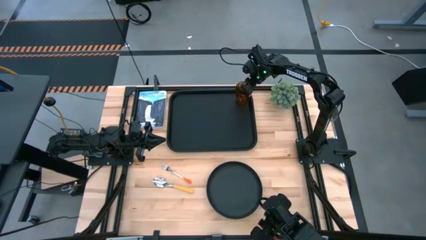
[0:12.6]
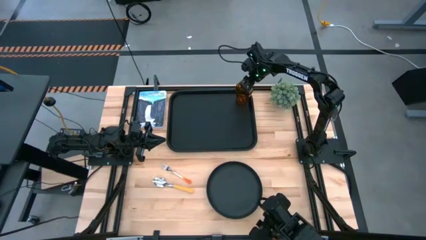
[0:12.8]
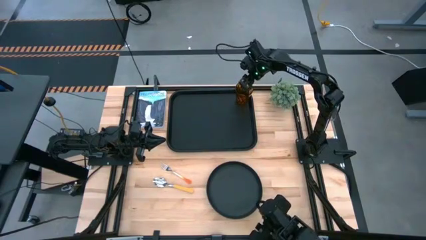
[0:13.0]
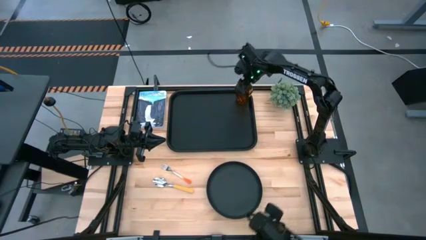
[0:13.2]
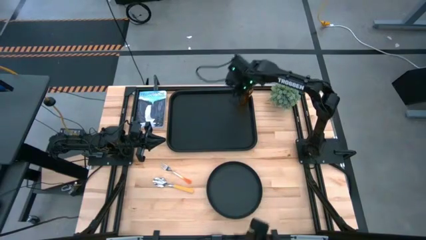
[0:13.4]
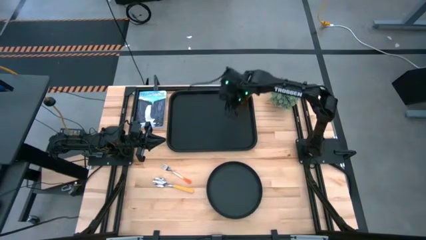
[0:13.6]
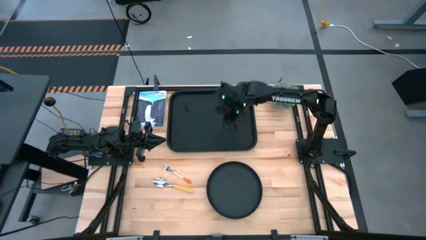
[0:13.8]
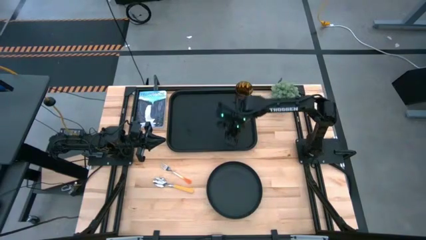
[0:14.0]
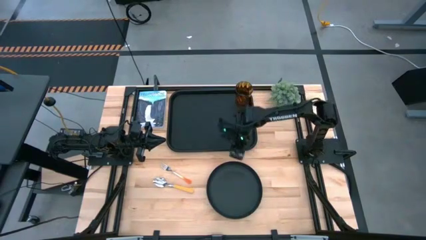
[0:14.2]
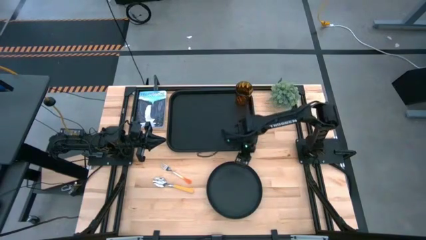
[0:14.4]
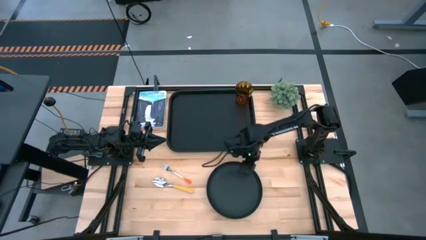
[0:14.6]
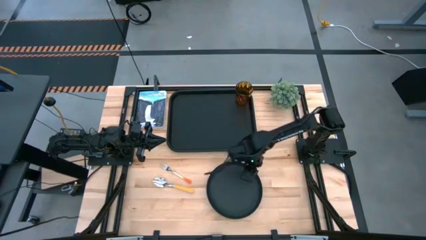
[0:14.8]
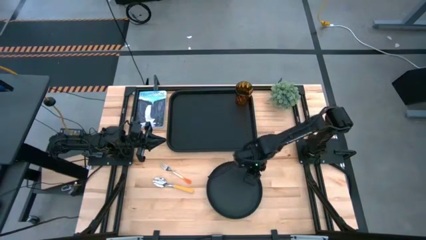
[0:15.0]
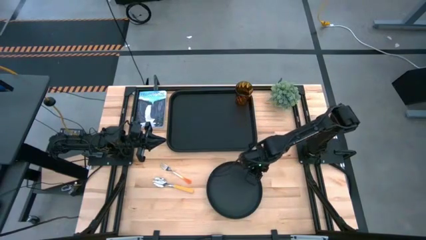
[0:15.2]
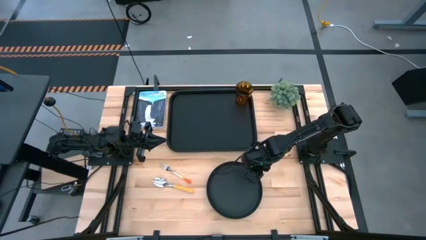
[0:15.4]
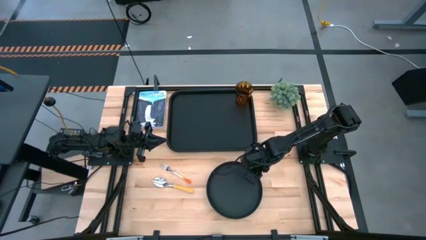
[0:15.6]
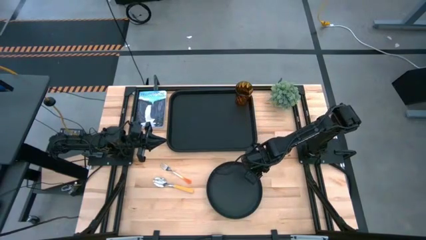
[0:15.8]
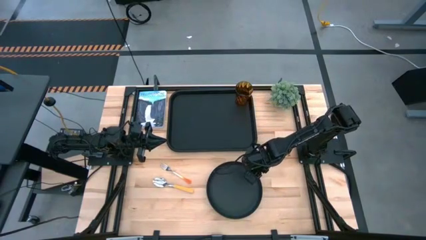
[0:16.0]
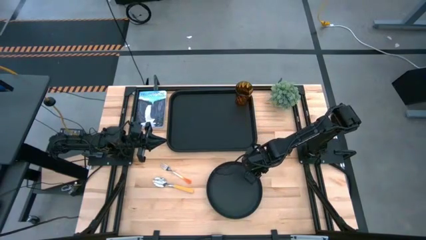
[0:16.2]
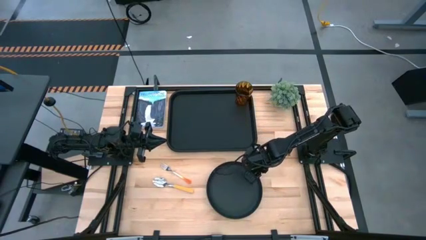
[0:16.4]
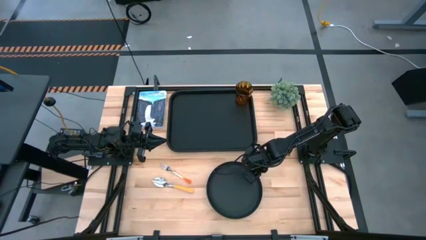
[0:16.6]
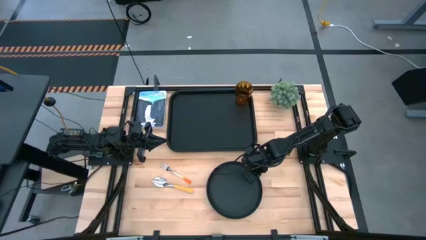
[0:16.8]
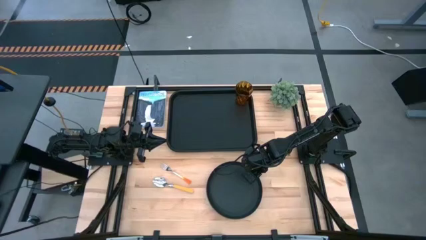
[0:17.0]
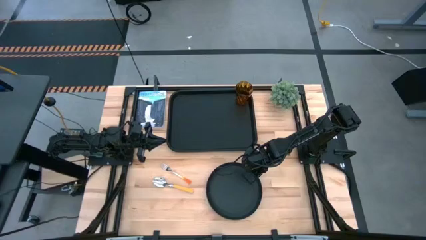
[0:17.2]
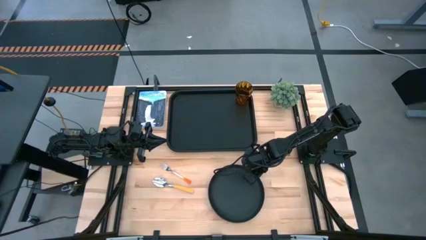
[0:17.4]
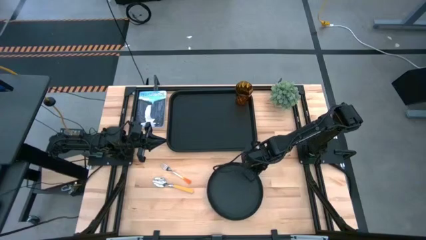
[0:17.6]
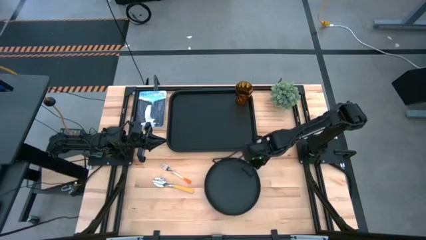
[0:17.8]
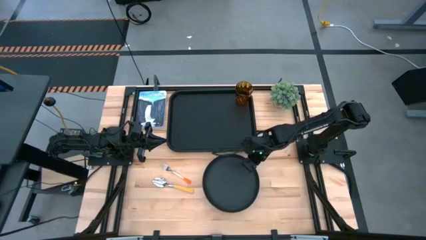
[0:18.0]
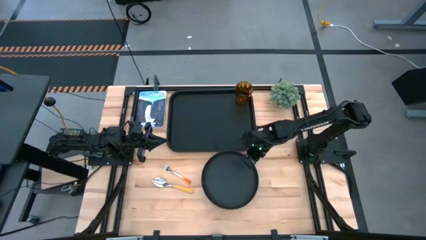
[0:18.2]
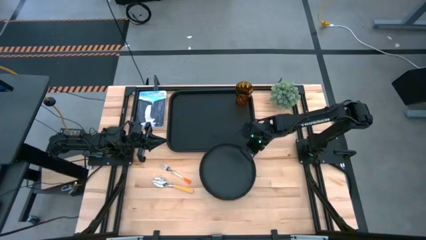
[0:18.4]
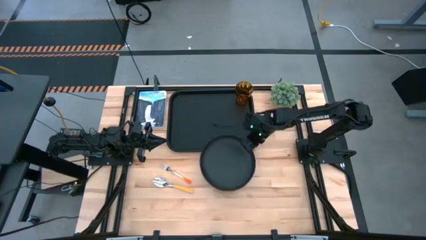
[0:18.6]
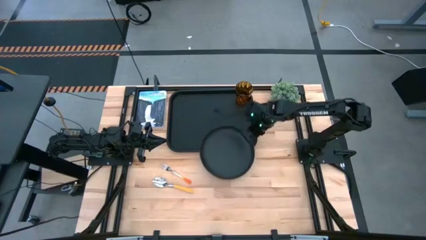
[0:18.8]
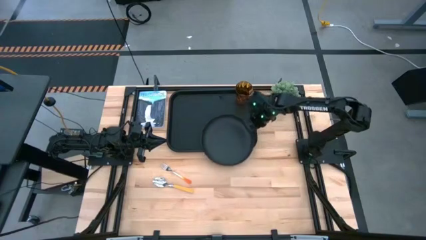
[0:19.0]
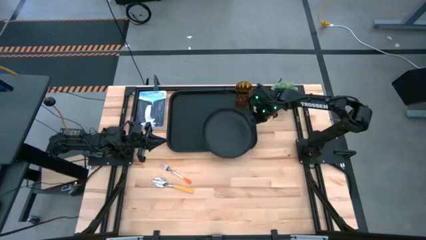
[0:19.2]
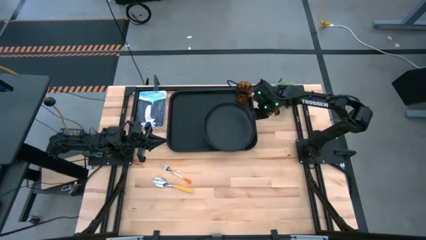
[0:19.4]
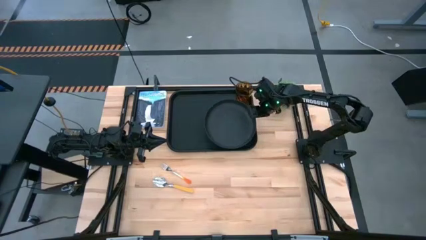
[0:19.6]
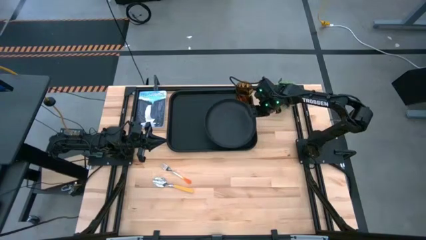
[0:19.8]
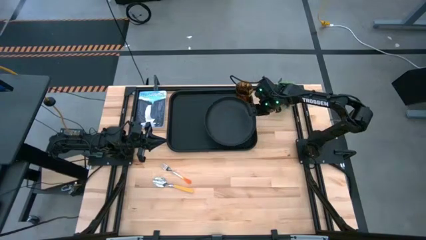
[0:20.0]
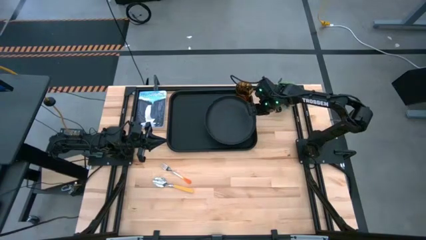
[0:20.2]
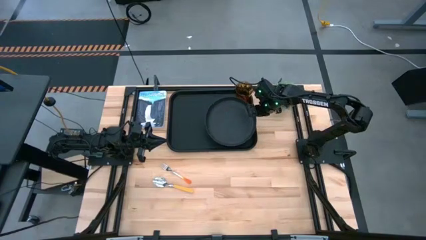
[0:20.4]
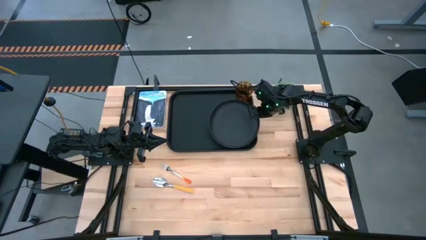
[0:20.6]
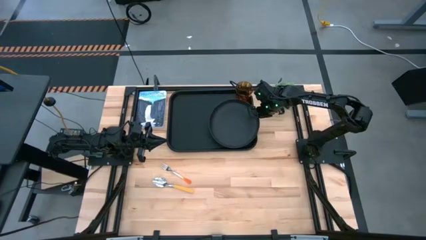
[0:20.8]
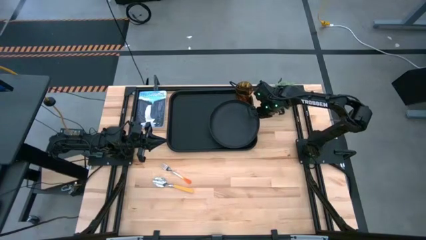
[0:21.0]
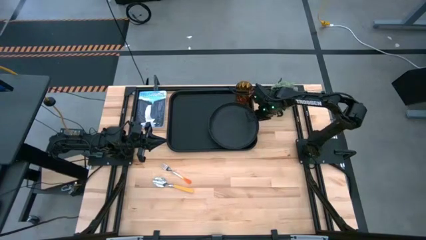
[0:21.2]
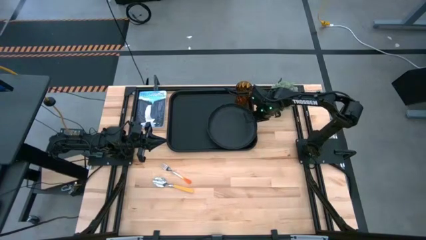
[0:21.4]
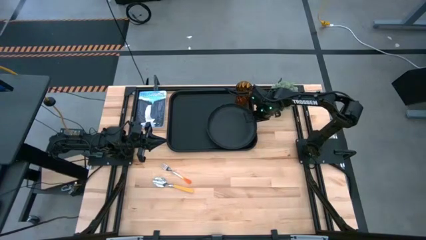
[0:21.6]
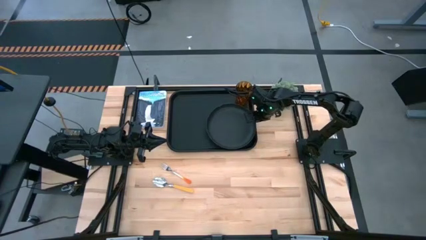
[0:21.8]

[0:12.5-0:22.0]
Task: Pick and place plate/cup/fork/spoon on tray
Put the black plate on the black tray to the bottom of the brown cup

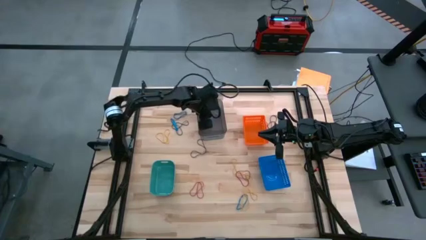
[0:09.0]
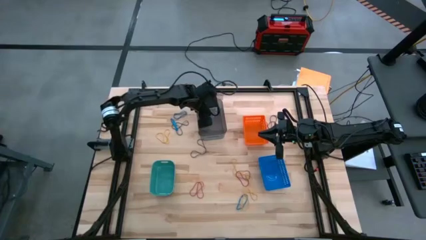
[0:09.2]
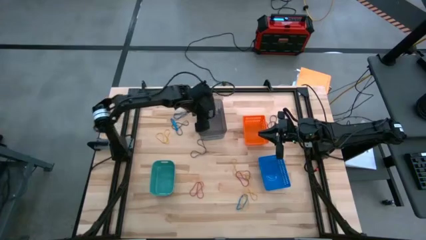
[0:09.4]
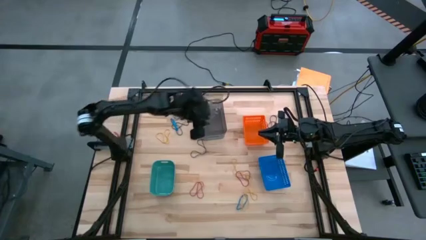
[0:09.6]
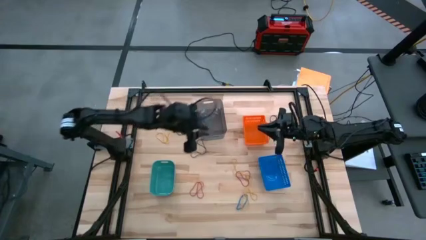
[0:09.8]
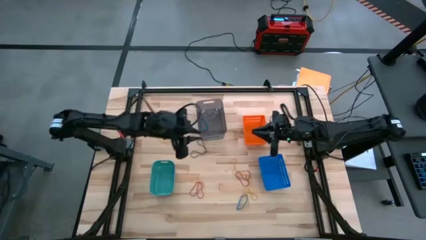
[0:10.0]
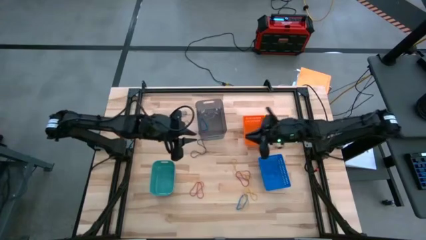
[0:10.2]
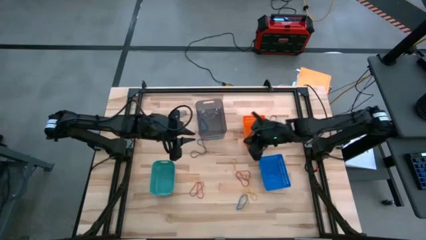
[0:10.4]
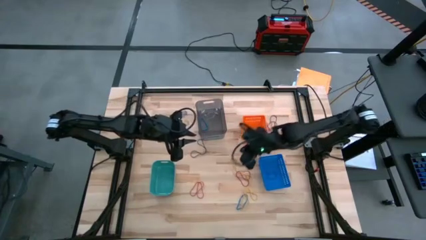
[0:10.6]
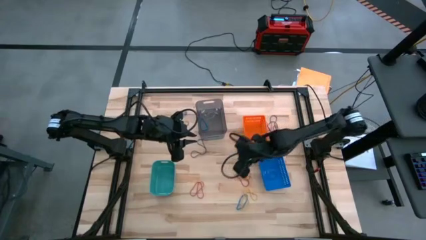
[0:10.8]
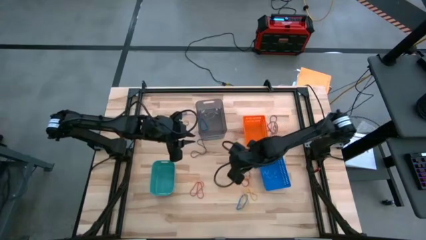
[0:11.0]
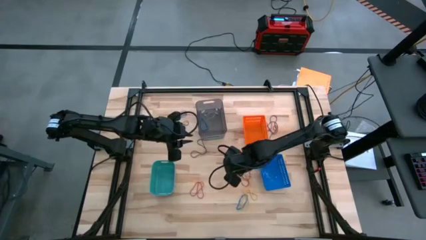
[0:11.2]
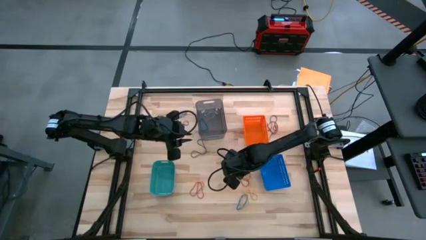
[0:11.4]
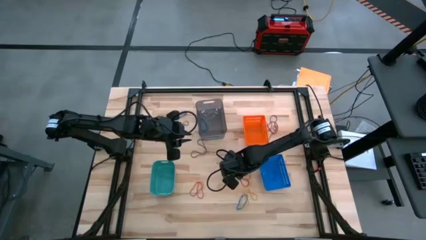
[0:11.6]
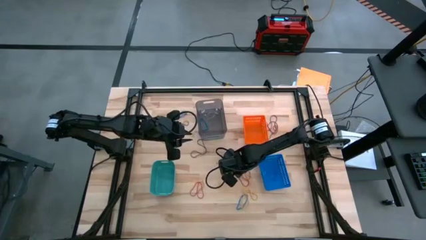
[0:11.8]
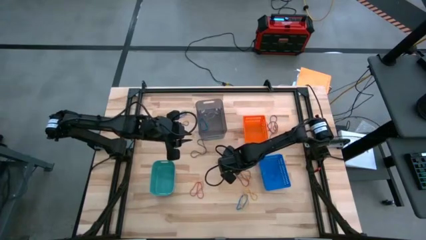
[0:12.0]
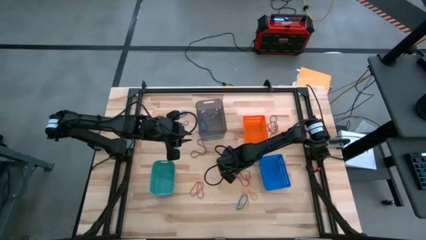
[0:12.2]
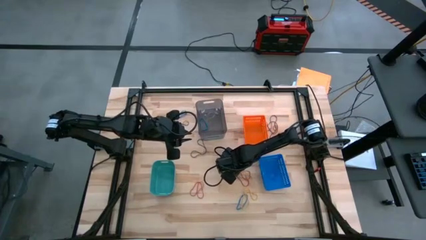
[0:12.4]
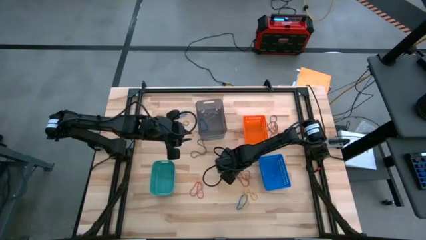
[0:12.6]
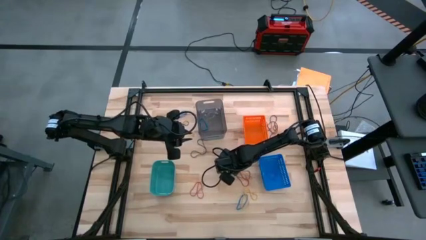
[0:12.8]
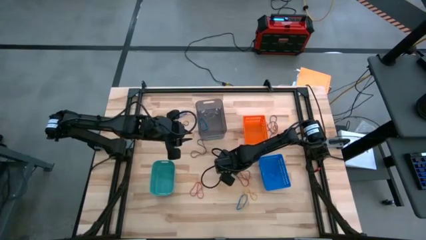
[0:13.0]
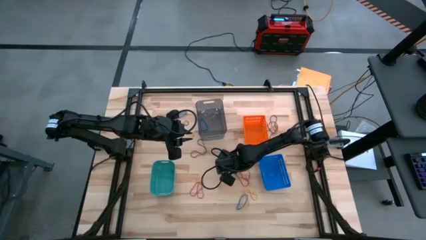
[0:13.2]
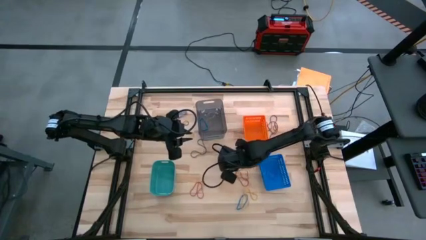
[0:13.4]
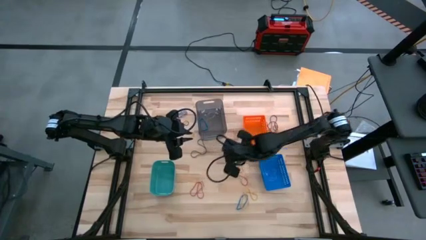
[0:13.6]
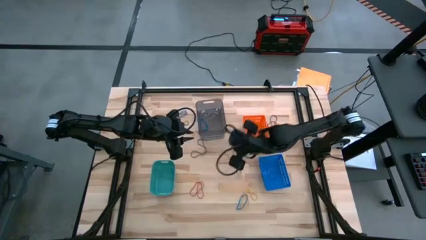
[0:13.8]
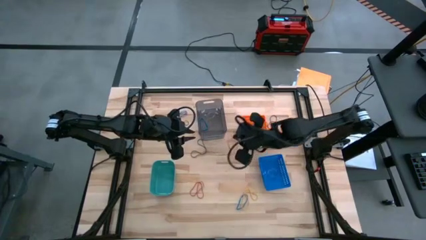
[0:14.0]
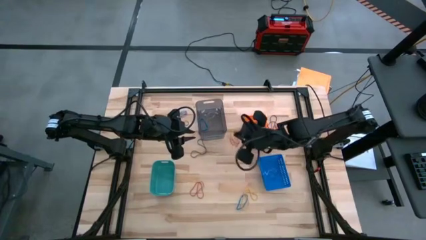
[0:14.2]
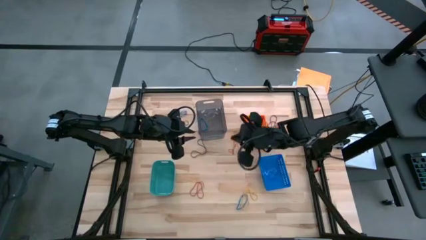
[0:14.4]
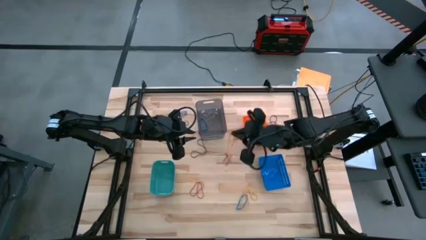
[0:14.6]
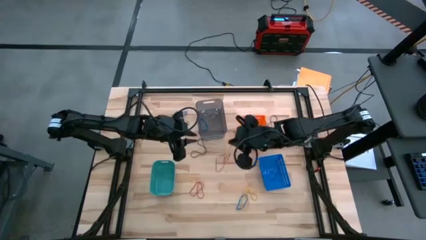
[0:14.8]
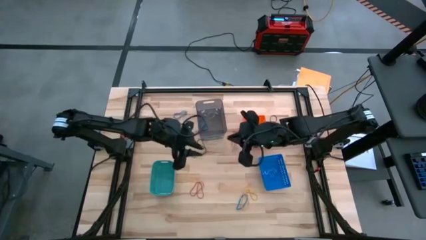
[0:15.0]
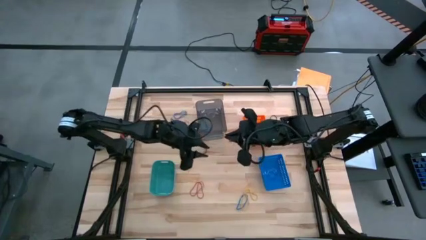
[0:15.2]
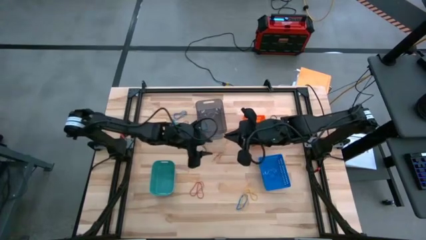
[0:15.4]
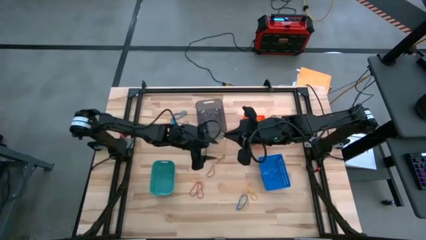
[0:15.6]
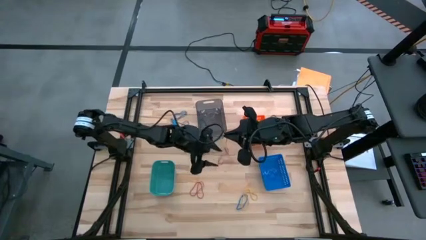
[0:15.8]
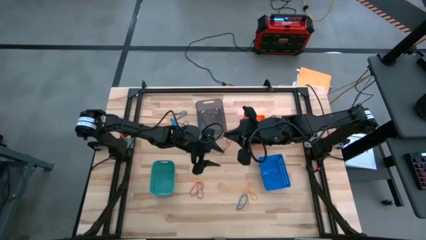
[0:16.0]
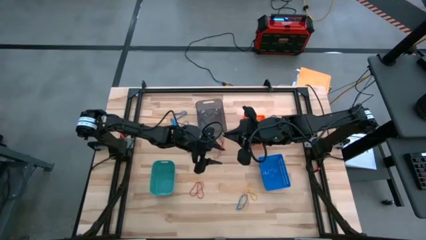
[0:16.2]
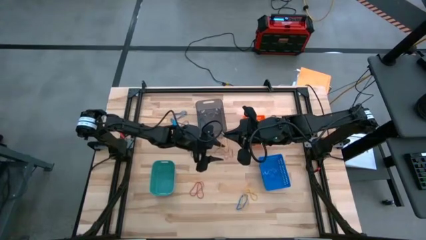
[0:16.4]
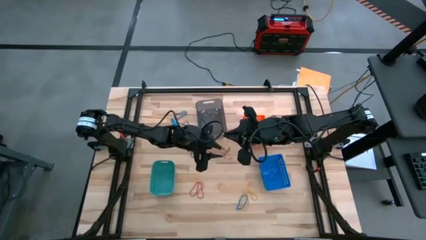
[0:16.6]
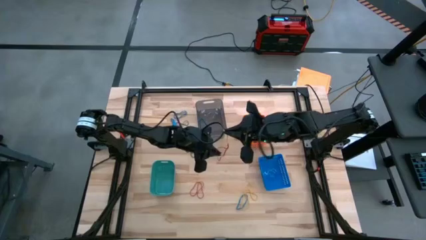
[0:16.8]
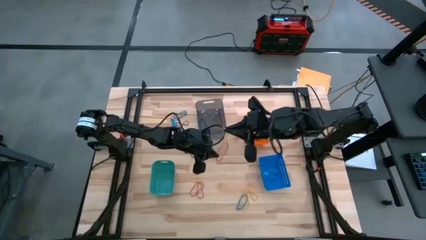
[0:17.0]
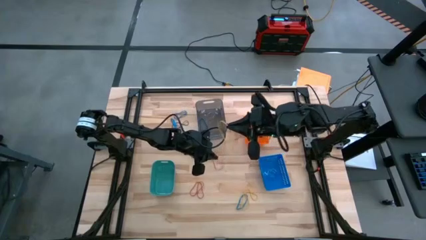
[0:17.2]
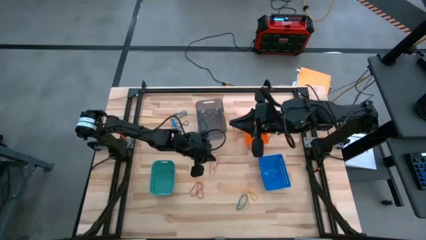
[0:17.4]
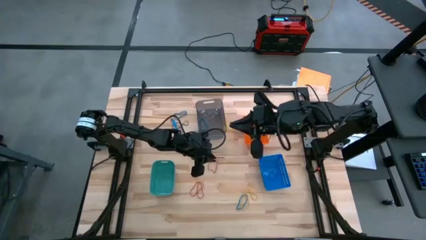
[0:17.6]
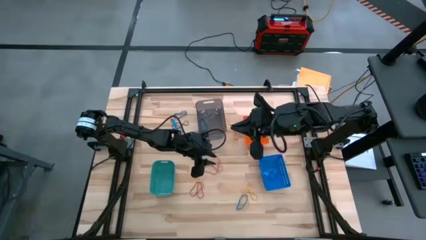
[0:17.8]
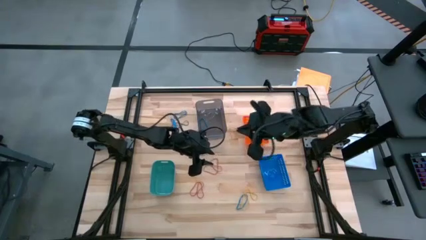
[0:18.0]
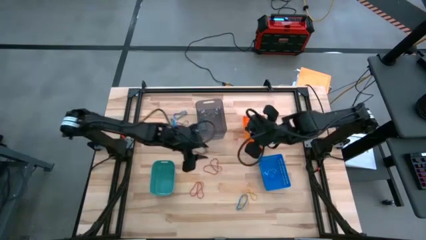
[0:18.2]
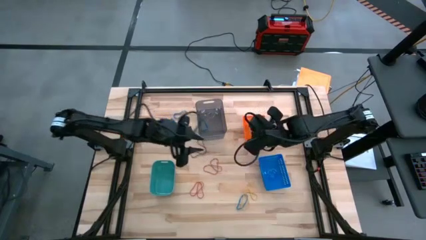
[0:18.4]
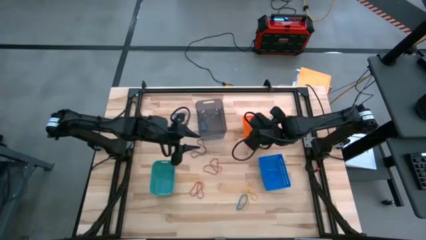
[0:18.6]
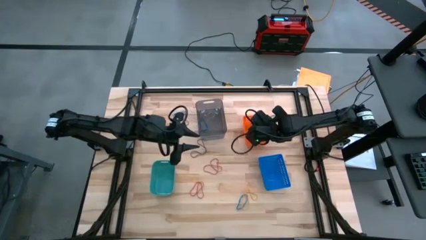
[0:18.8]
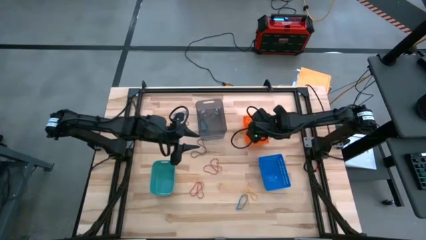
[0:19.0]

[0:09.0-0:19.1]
Task: Sort rubber bands into baskets
Put the yellow rubber band into the orange bin
